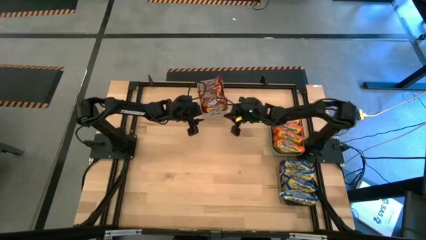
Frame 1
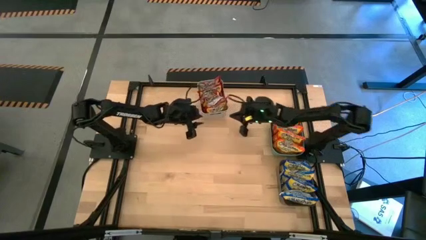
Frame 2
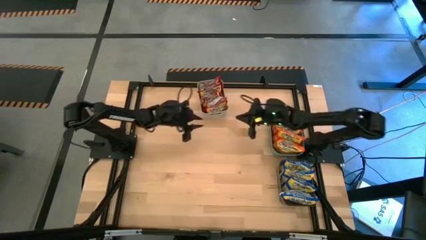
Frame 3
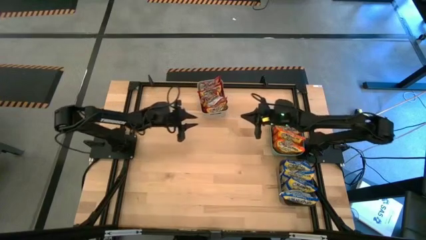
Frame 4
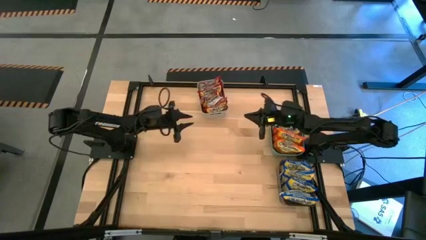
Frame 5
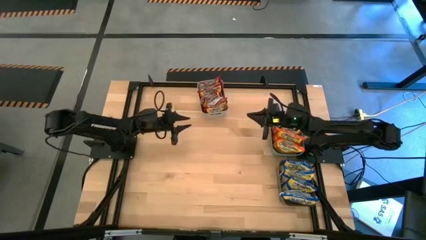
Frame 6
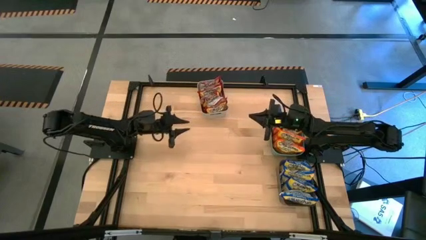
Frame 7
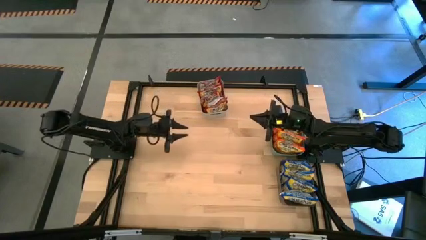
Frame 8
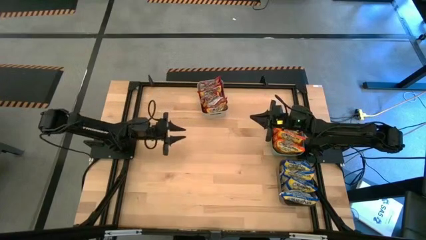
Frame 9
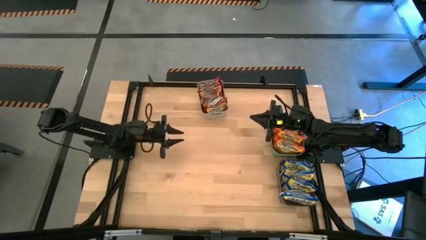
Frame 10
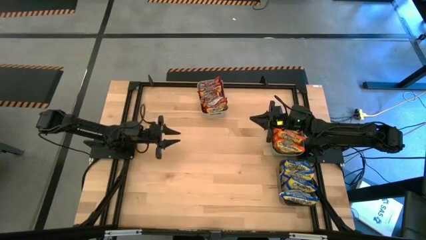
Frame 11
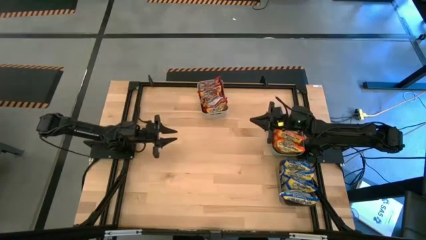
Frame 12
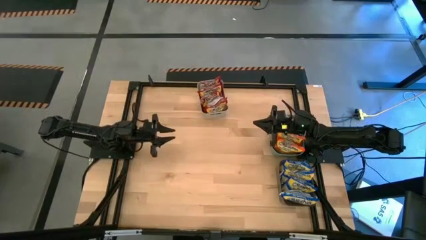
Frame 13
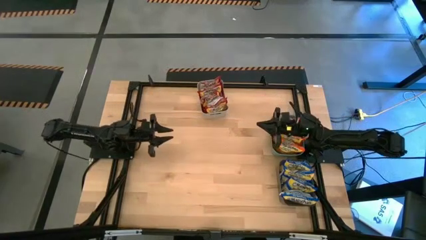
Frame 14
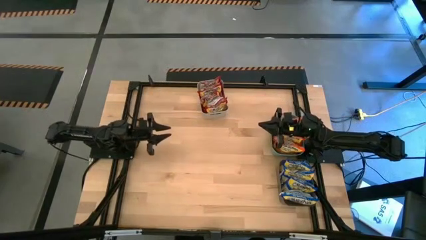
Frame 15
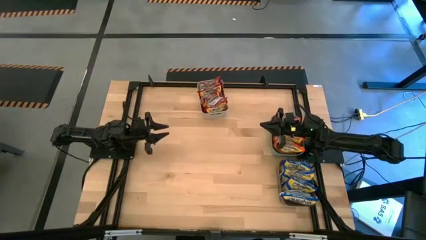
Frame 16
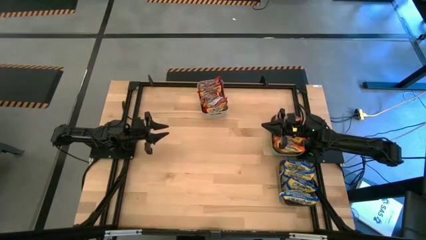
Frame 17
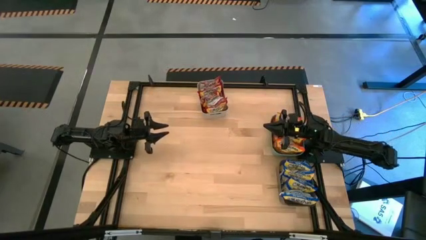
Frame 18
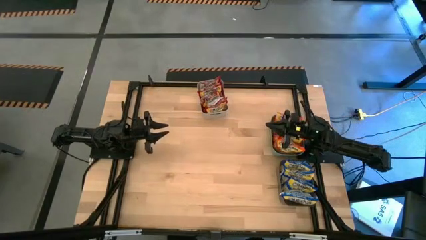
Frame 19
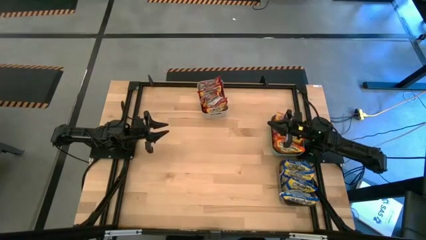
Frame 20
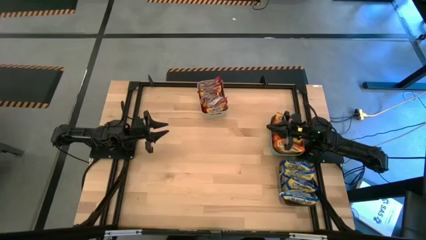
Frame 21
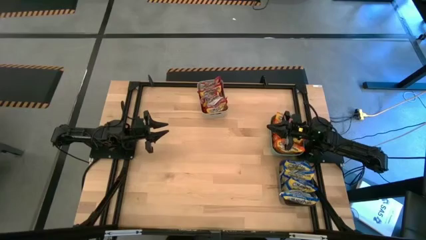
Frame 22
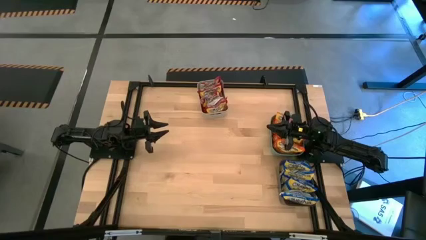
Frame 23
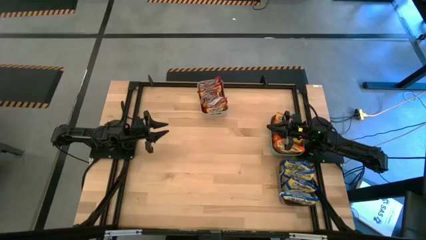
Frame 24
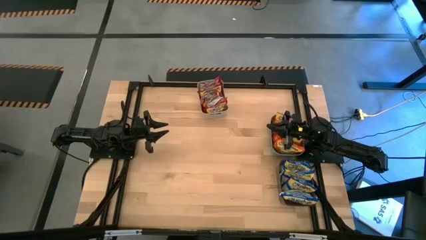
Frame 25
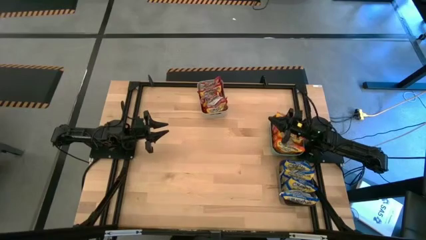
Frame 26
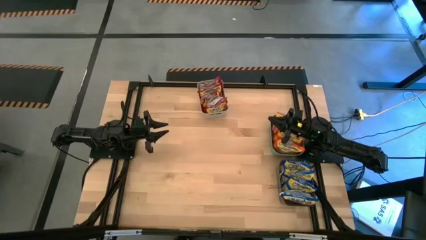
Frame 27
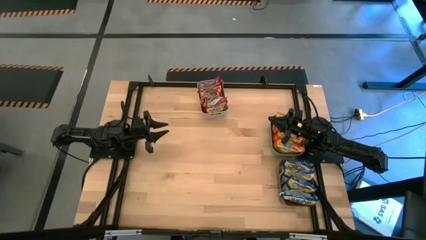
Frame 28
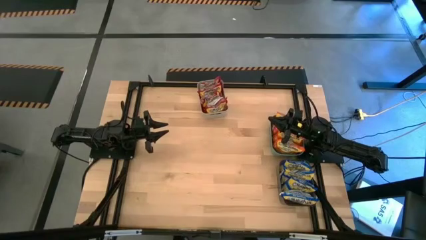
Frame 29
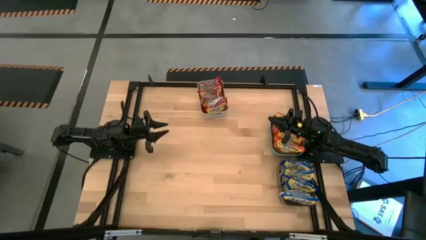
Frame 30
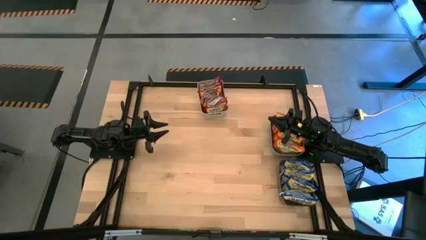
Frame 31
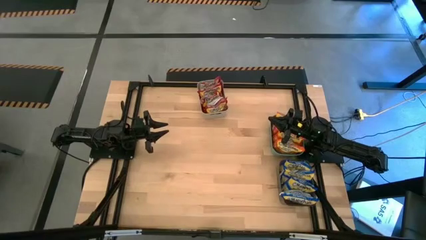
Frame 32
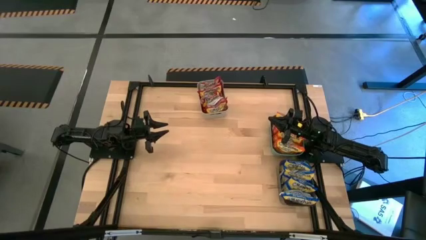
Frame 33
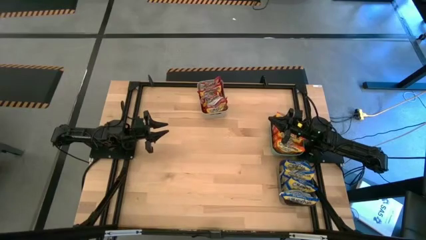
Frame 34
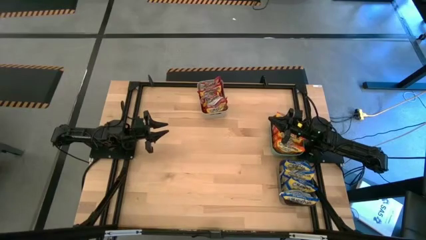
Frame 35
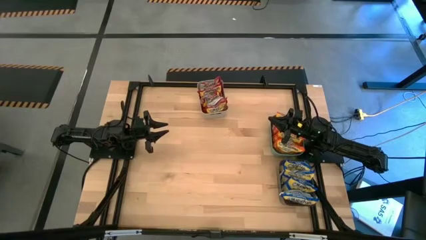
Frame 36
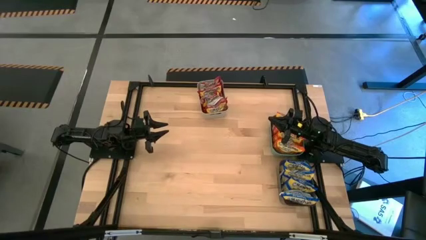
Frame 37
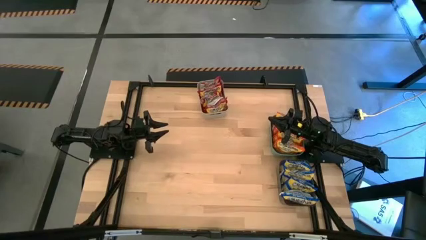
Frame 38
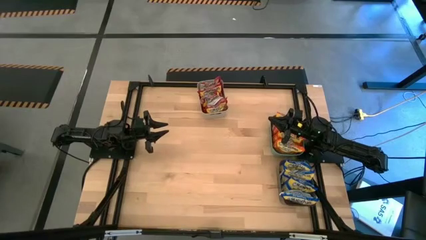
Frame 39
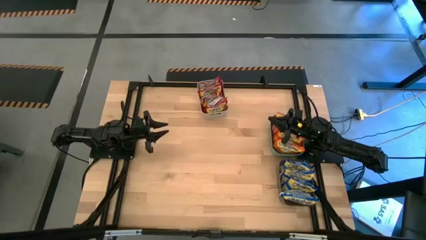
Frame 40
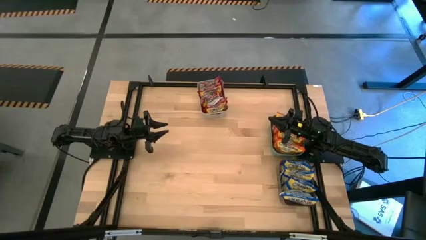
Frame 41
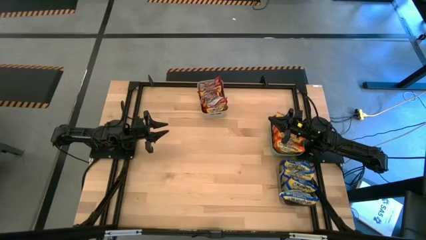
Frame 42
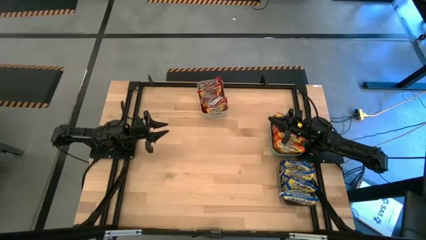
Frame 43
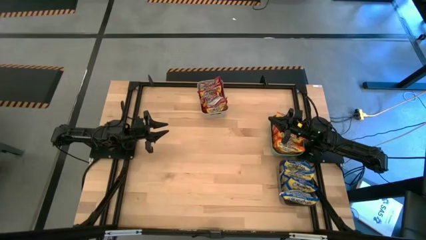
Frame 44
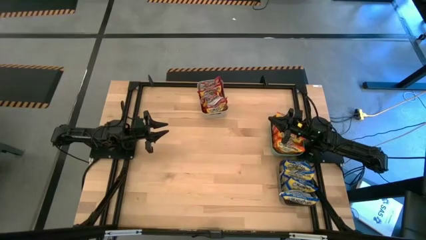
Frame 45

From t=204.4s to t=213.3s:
Task: Sort Maruchan noodles
Return to Home Position

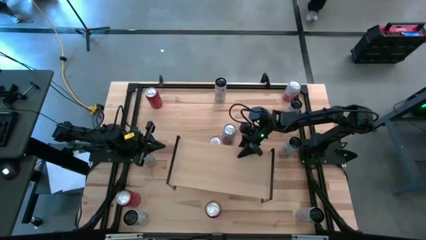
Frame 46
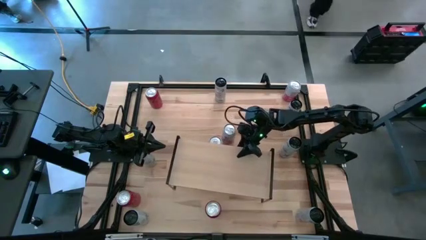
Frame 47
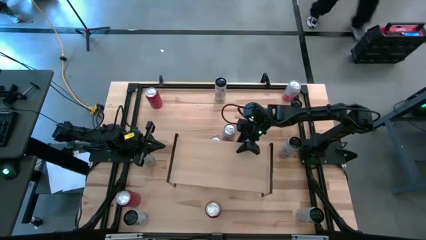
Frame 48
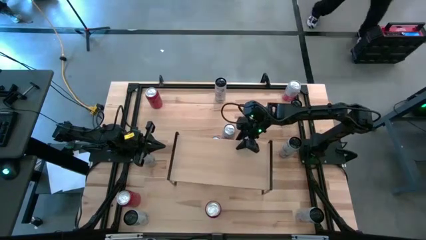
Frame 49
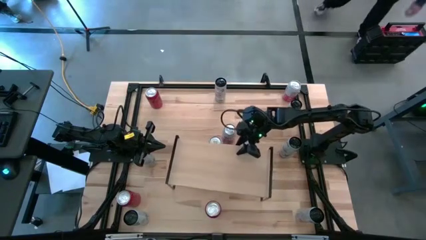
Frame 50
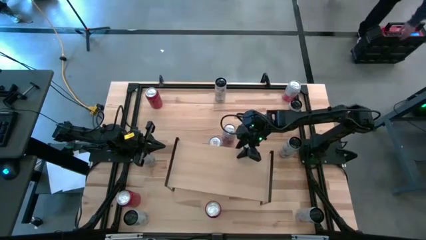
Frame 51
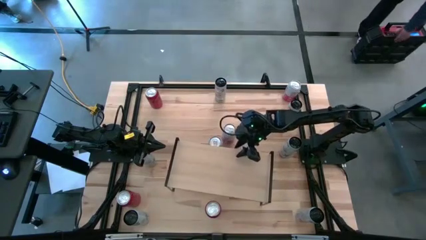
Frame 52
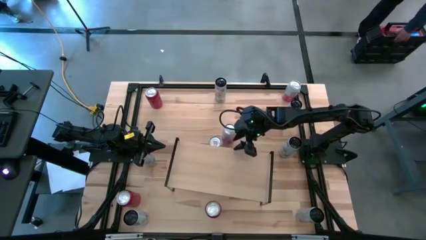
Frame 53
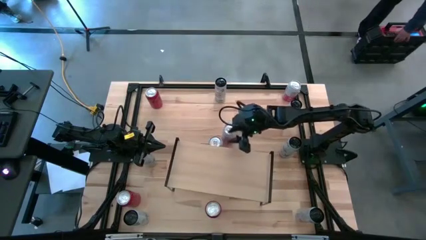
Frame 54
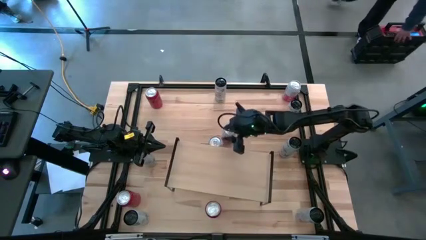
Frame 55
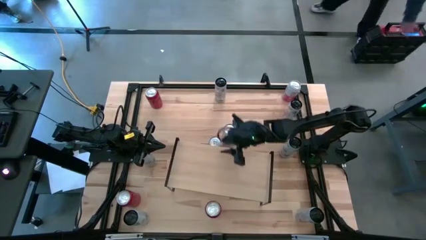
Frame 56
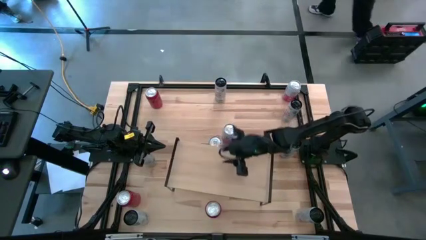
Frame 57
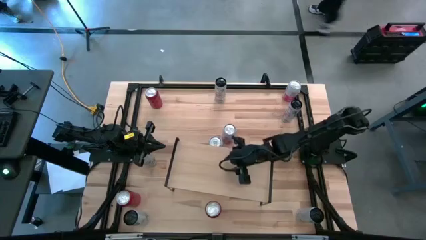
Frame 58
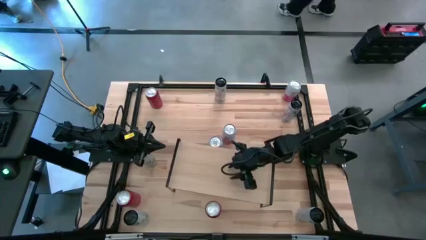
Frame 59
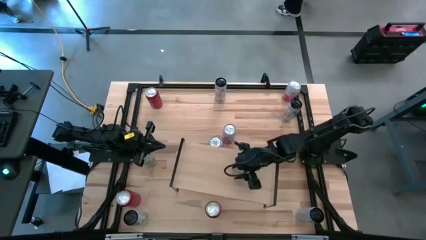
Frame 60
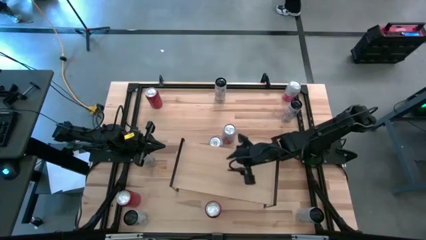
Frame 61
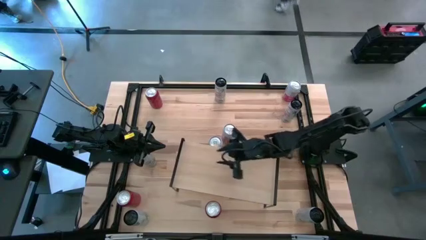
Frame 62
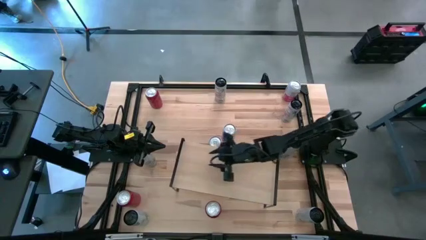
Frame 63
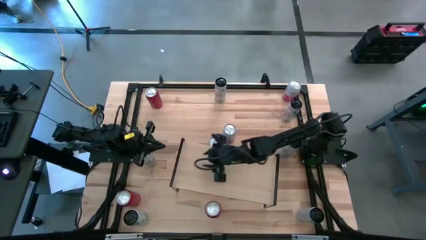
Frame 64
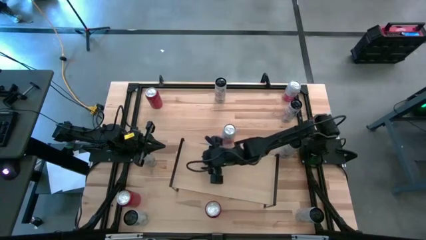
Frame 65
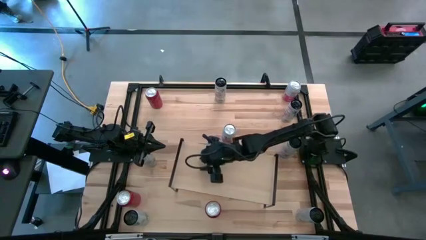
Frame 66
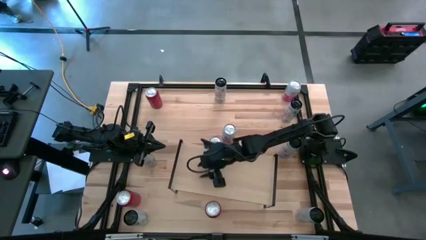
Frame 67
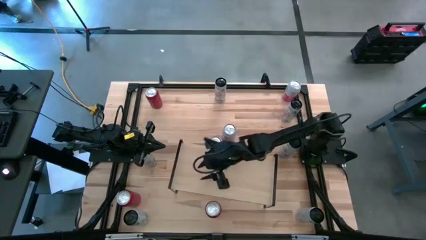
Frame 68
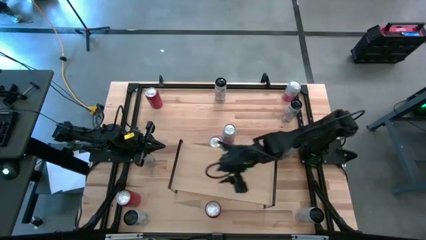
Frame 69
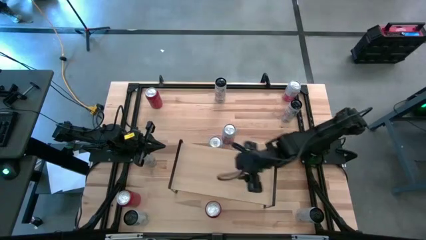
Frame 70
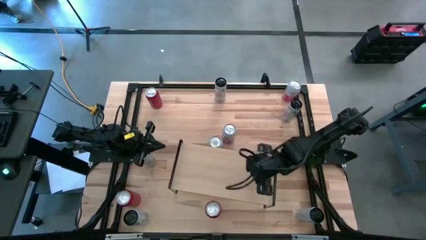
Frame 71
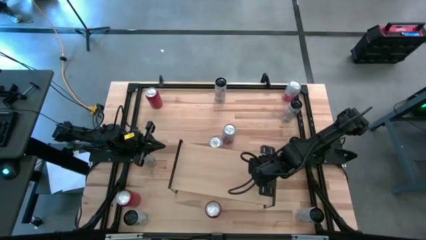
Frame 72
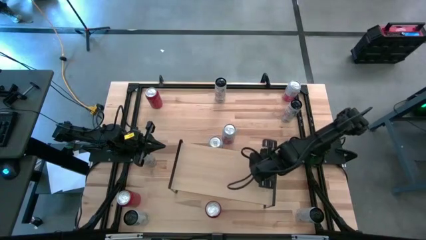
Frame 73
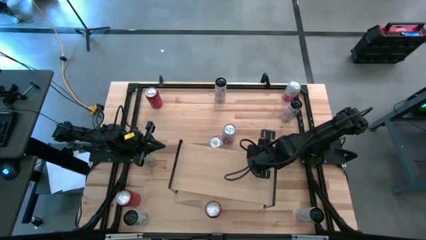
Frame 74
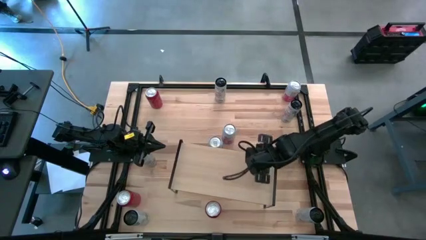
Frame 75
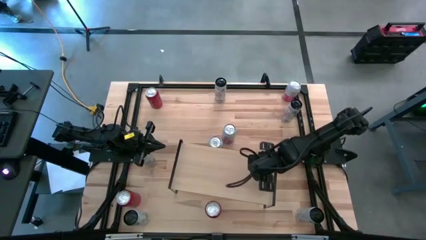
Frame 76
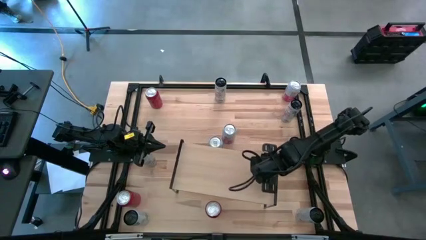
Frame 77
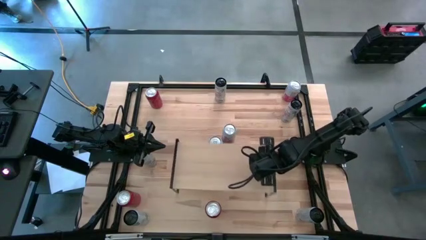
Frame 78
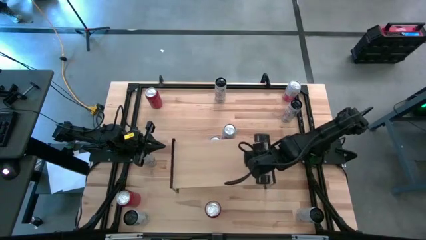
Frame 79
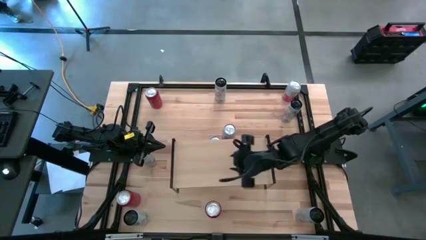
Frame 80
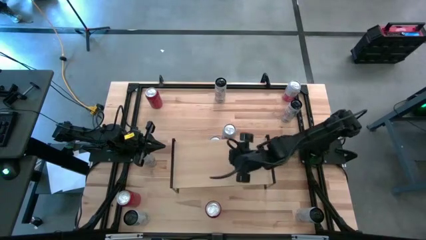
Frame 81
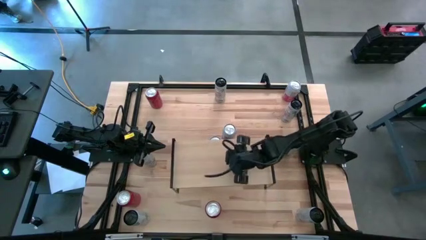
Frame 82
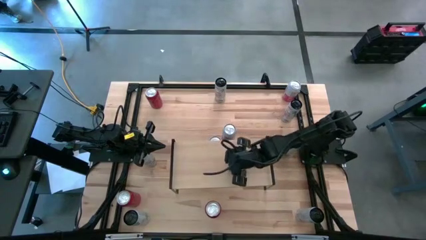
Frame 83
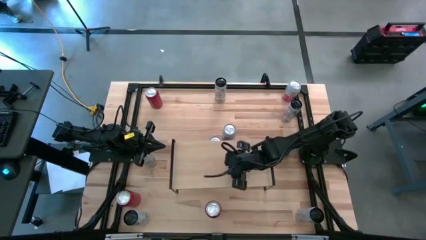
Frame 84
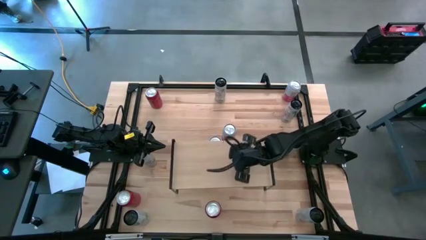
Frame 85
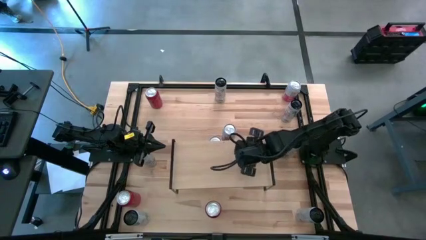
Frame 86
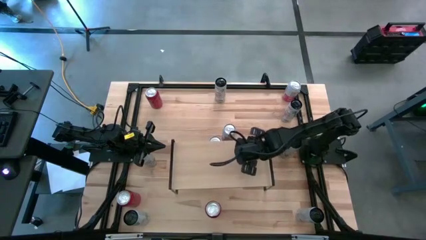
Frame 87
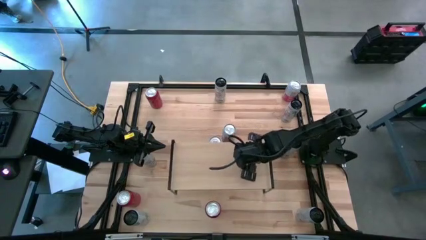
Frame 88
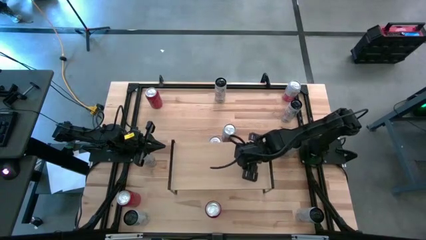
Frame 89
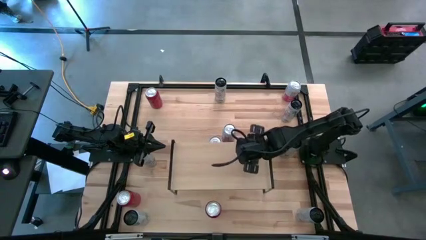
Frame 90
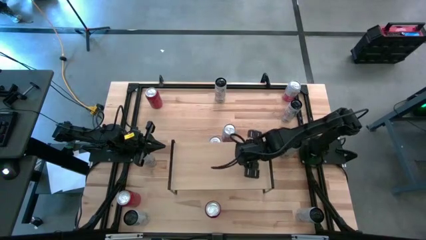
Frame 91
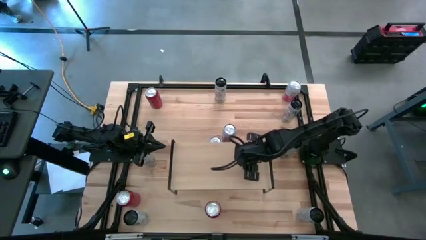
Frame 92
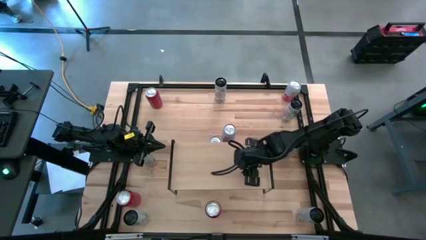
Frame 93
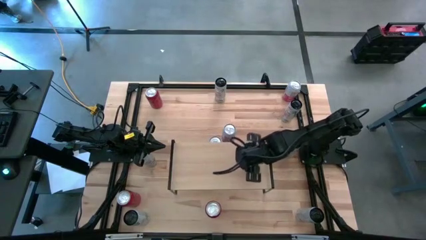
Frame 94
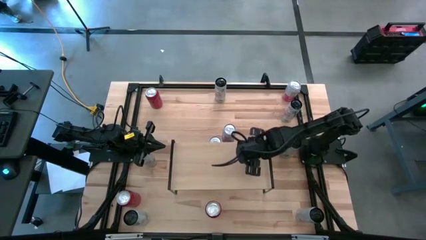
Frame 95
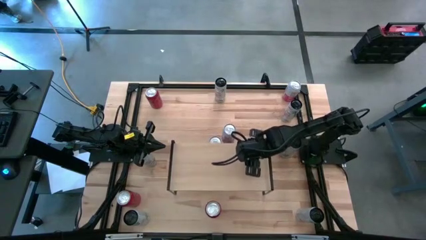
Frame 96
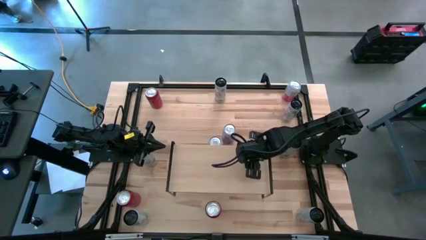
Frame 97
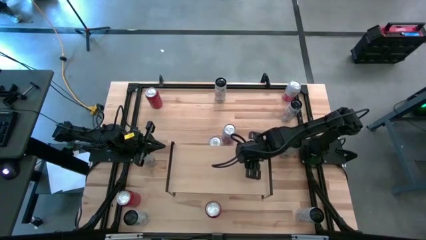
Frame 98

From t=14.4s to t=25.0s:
Task: Place canned beverage on shelf
Move the shelf to the center of the table
